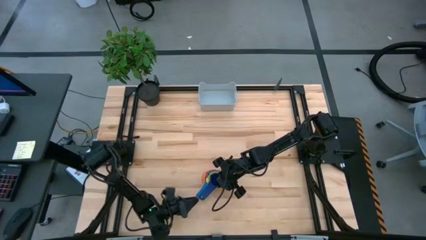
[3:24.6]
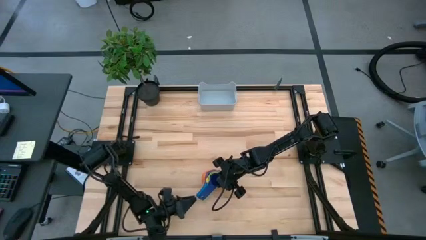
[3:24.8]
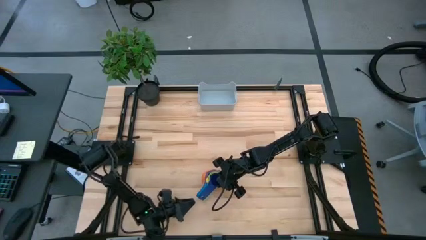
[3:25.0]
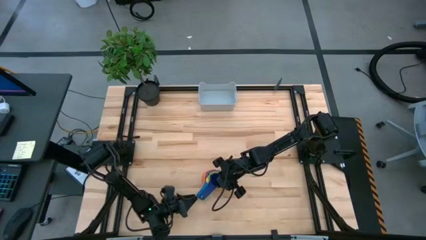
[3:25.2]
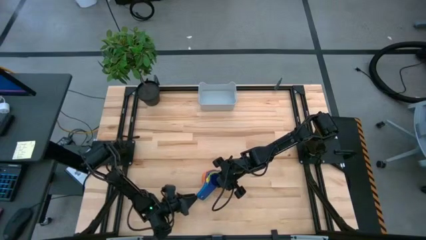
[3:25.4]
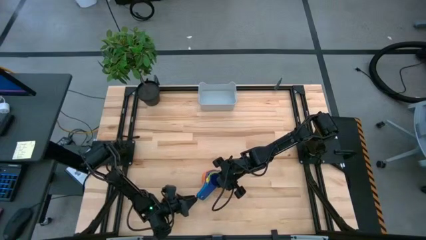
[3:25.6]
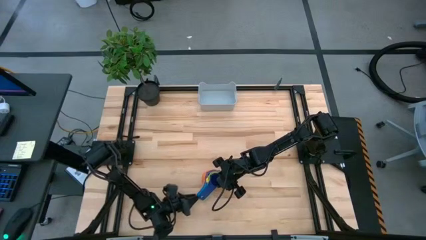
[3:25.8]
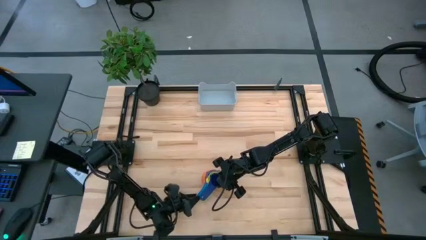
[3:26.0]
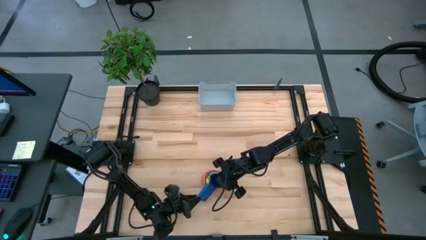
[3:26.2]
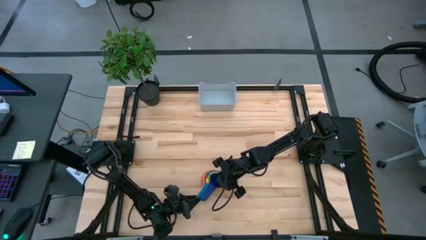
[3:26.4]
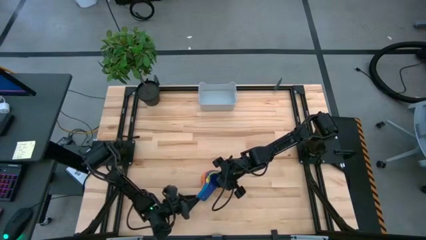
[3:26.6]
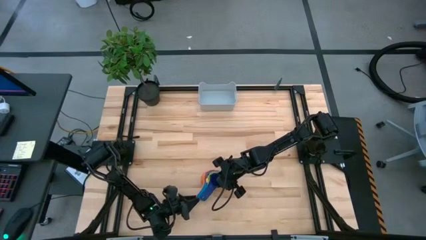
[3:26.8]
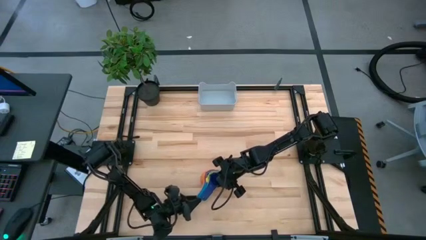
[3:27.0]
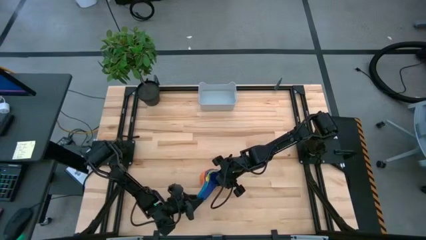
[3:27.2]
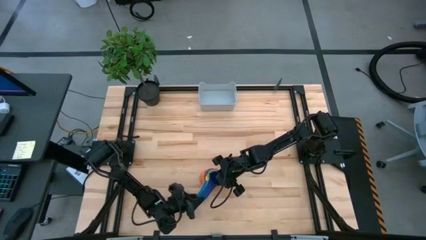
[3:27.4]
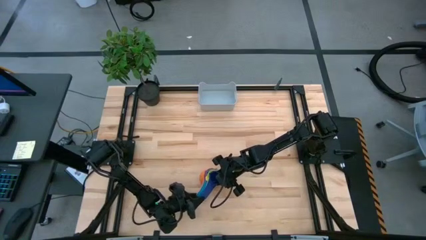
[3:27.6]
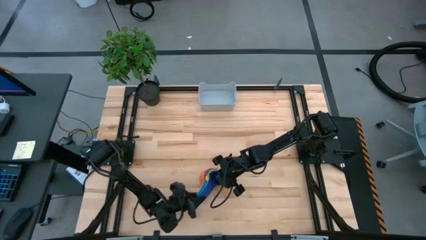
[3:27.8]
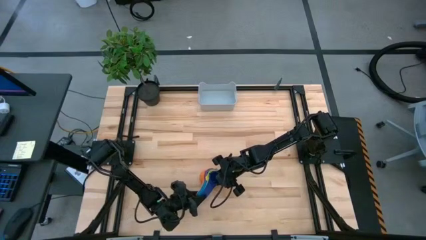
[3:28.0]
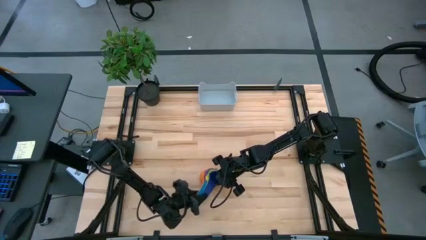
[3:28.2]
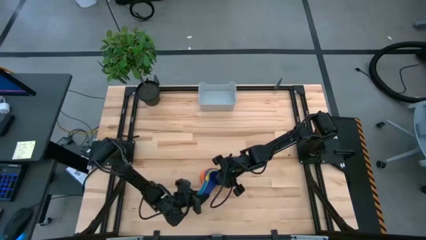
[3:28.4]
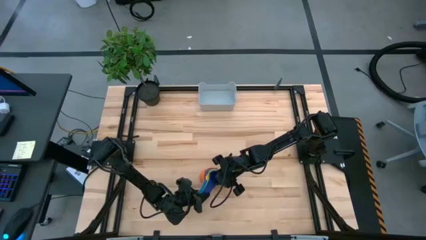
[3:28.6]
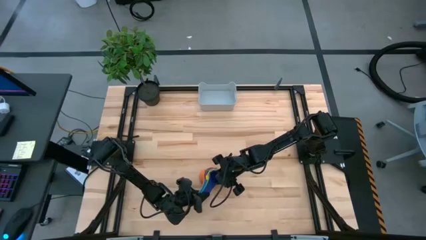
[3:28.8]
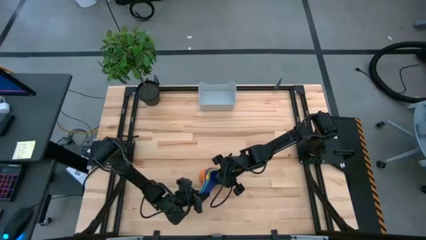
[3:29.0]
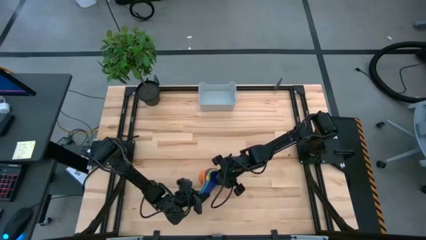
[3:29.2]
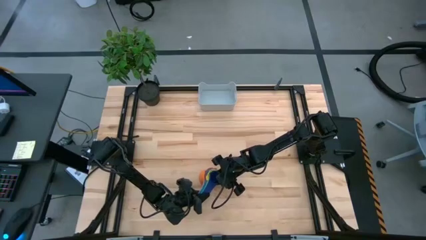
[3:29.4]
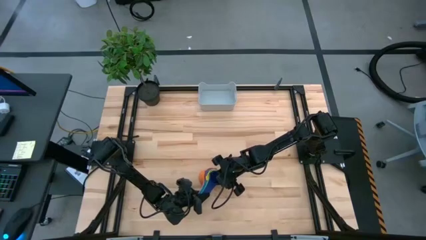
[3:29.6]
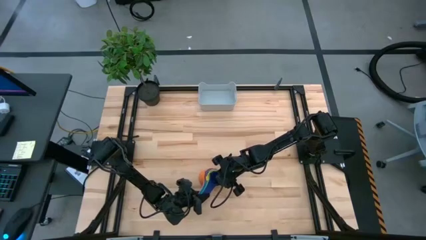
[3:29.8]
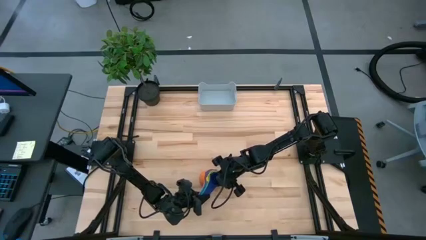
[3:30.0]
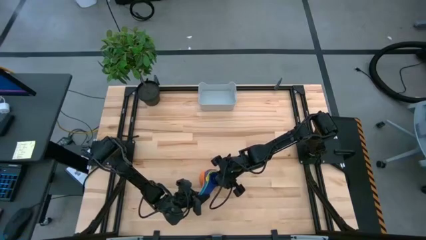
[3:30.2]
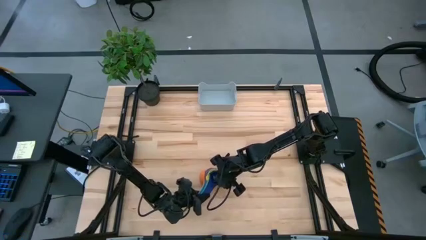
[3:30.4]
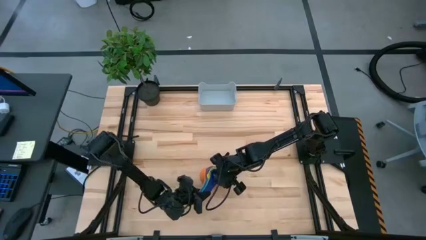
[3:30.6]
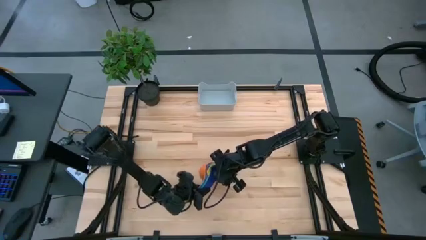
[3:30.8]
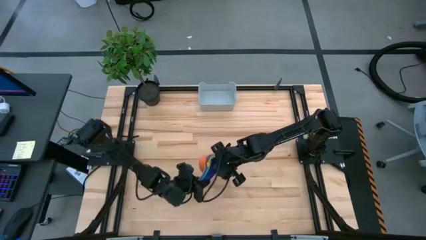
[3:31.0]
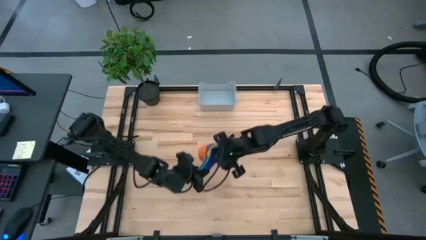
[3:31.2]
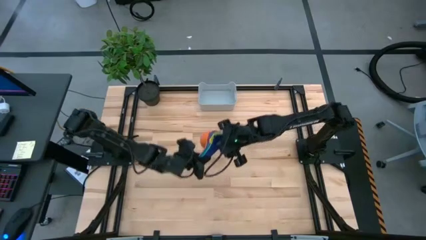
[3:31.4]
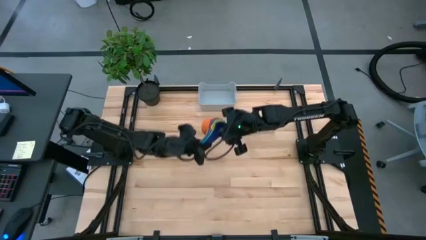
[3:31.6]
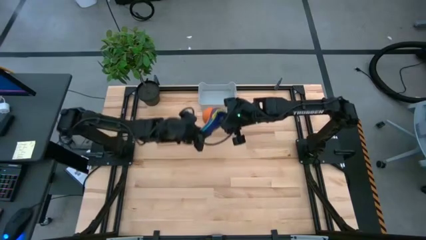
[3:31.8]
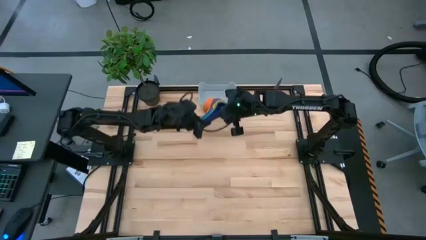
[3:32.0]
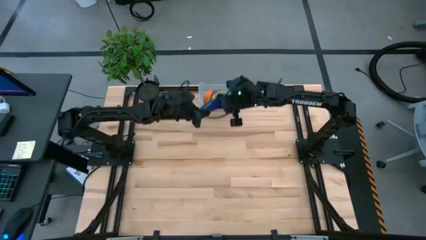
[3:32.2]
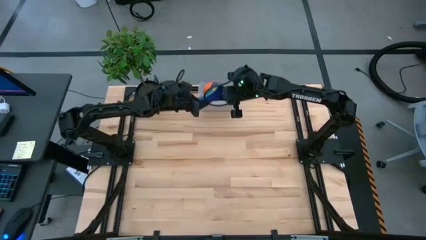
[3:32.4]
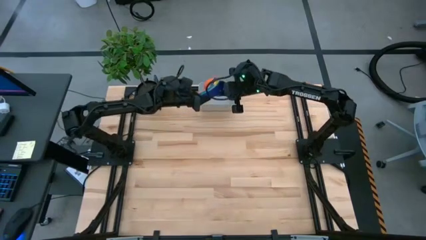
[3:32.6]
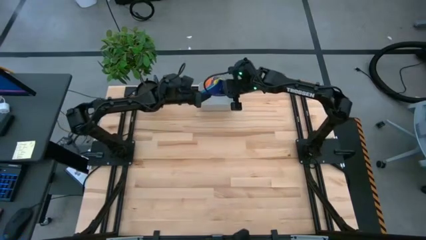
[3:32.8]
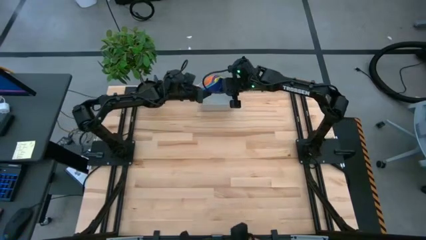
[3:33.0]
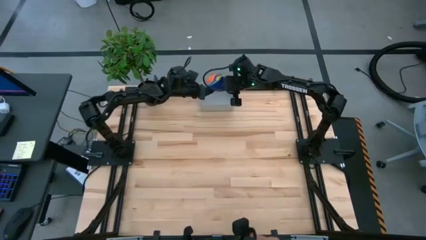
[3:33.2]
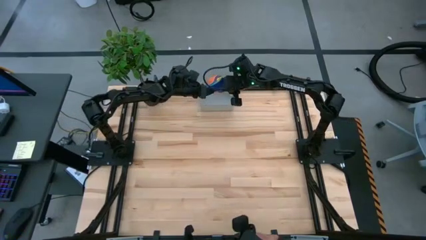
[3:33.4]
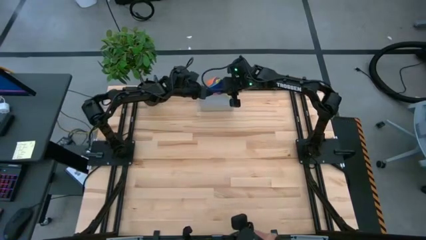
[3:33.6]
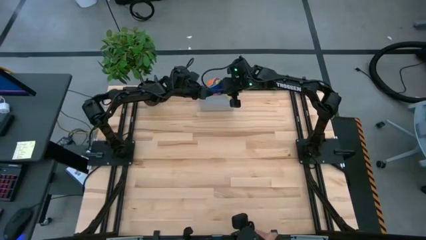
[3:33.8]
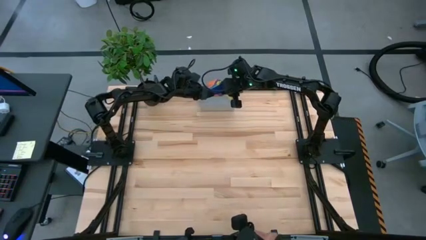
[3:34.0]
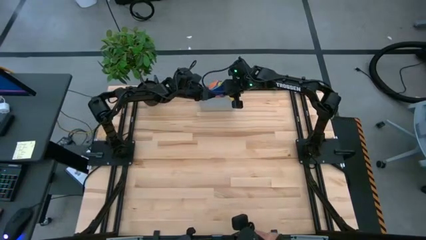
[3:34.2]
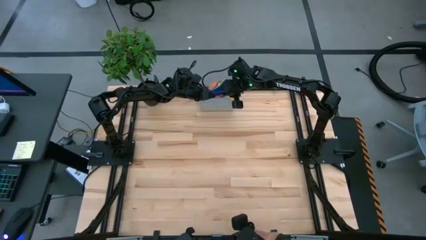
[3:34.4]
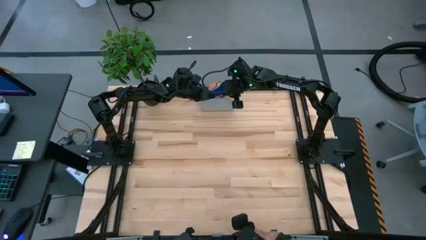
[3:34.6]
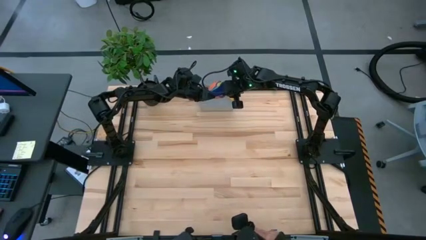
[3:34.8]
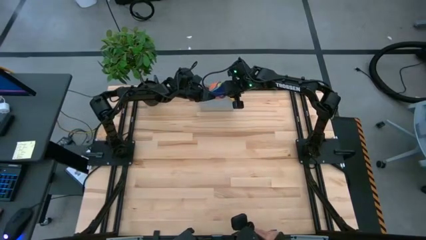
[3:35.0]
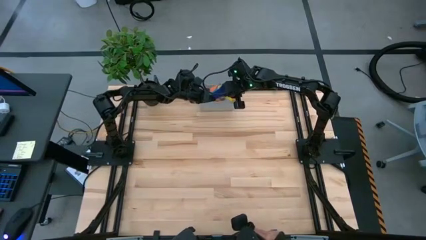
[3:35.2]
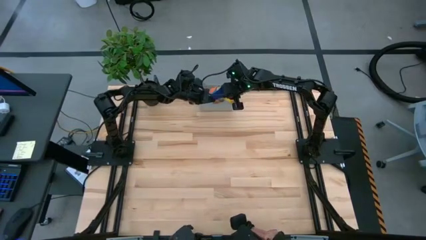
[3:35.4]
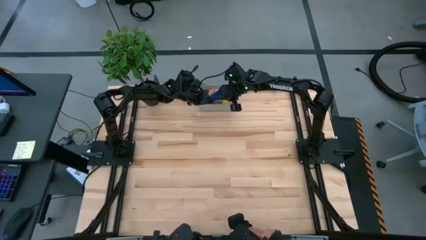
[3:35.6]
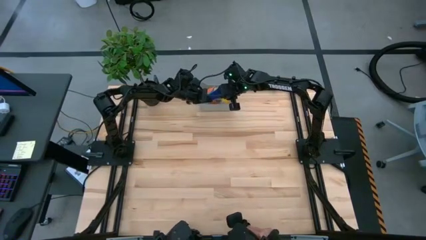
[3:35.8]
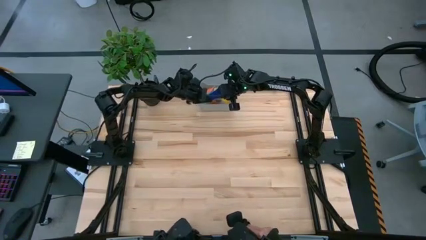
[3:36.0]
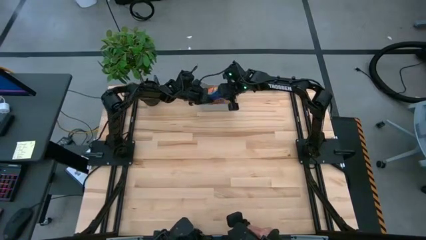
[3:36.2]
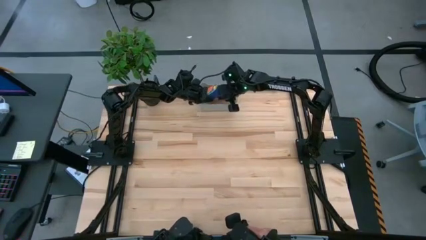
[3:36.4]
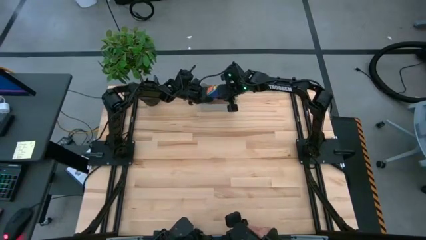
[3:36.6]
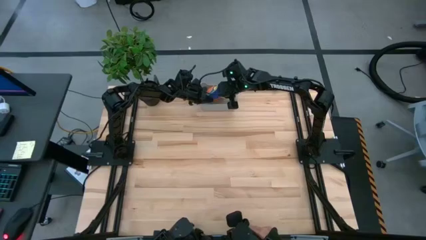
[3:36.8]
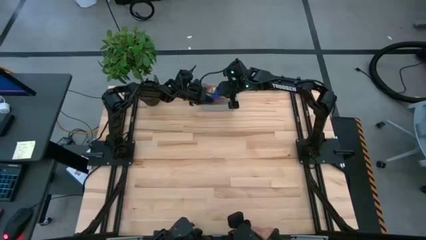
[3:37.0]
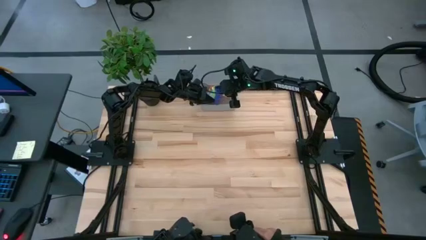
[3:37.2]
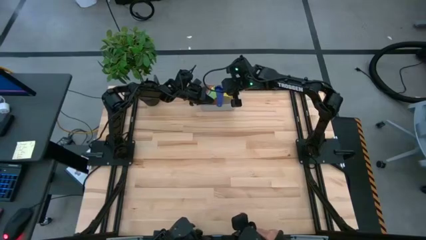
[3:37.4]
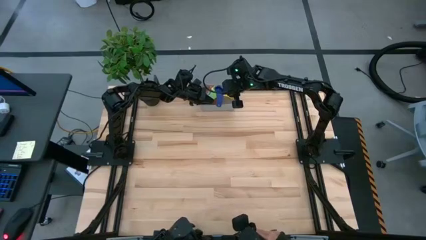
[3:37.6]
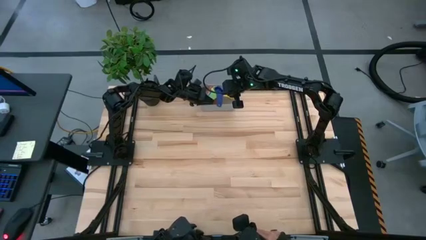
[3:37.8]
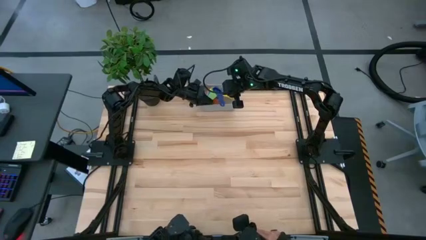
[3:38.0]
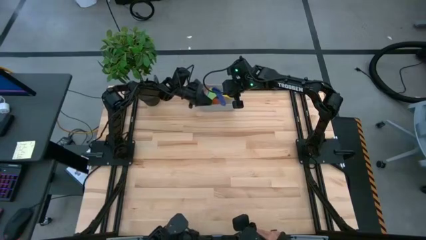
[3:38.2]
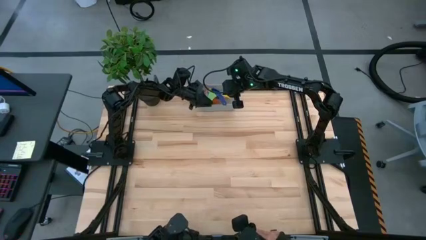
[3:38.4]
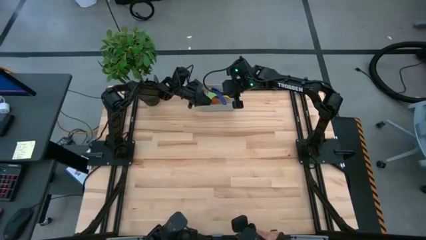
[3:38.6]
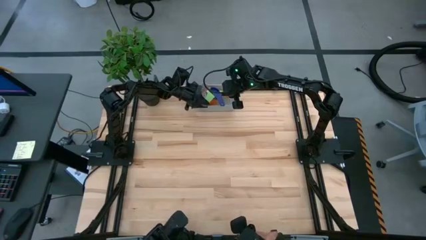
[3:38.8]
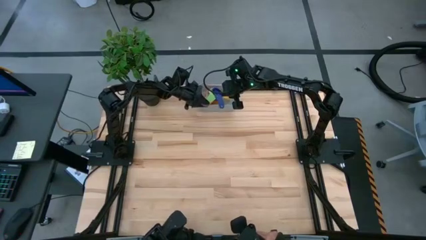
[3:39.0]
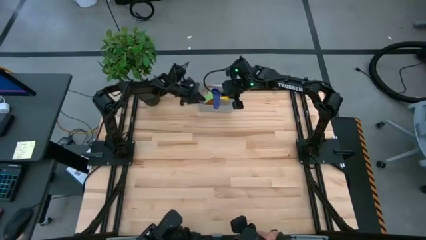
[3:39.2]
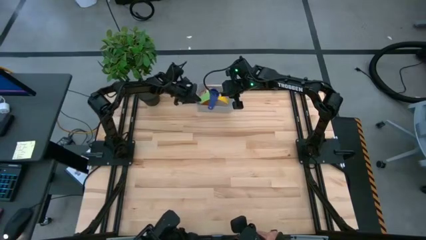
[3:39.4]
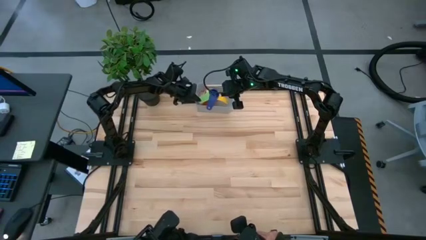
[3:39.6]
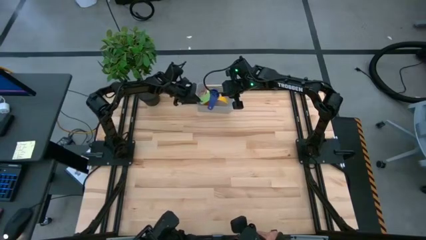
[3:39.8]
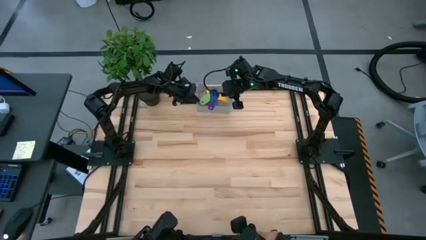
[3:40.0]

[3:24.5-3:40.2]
Task: Nest measuring cups in basket
Put the stacked measuring cups into the gray bin
